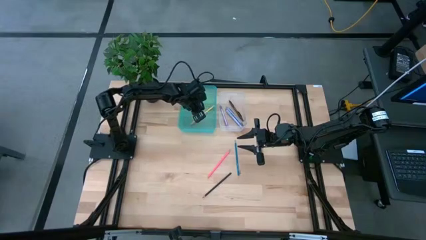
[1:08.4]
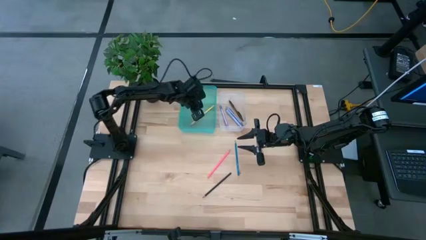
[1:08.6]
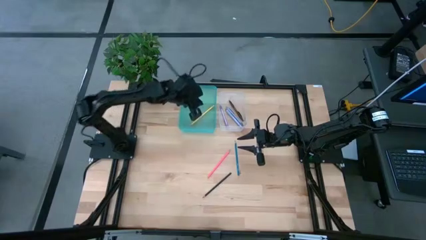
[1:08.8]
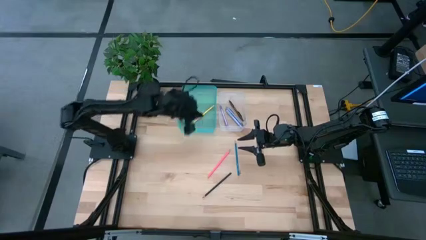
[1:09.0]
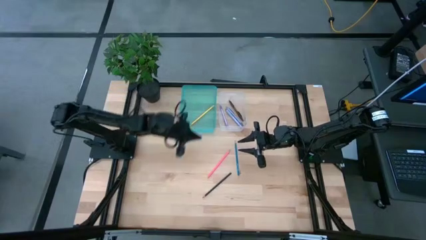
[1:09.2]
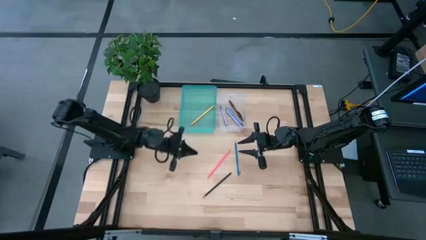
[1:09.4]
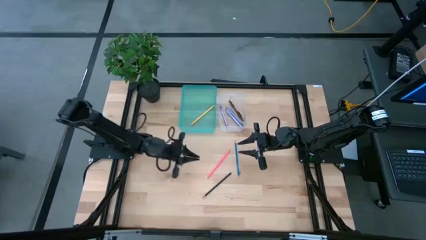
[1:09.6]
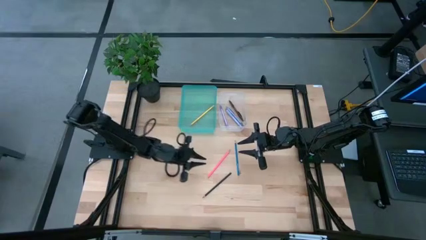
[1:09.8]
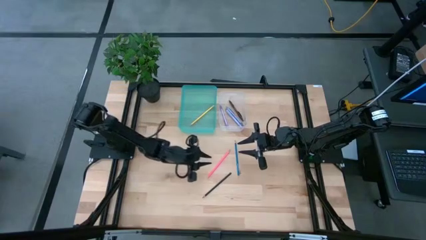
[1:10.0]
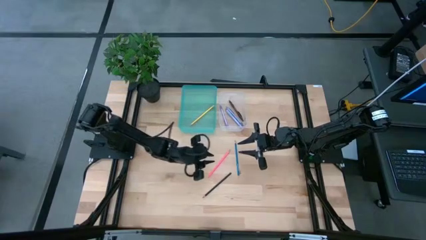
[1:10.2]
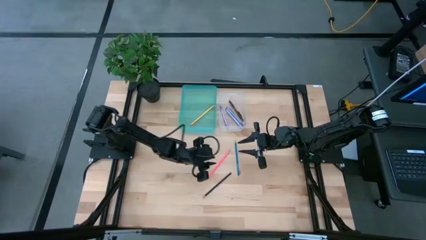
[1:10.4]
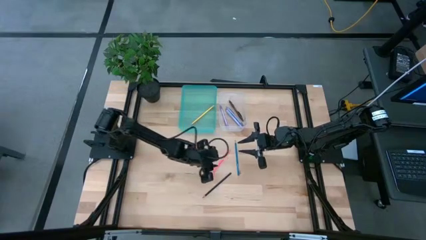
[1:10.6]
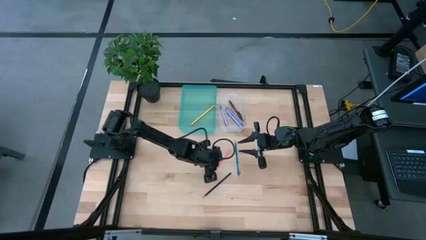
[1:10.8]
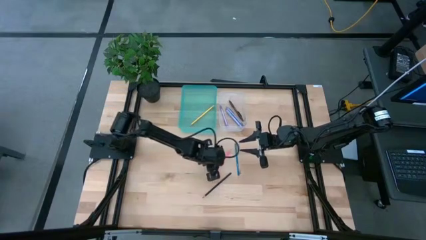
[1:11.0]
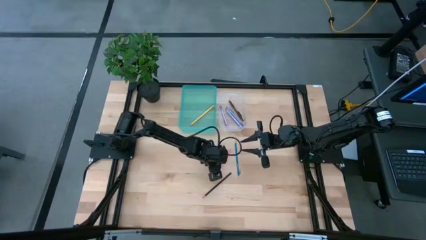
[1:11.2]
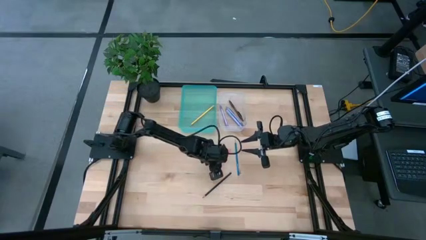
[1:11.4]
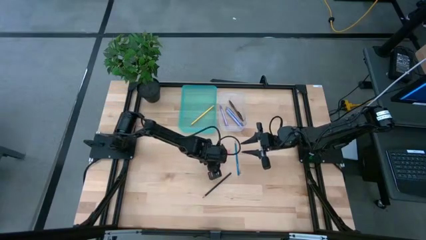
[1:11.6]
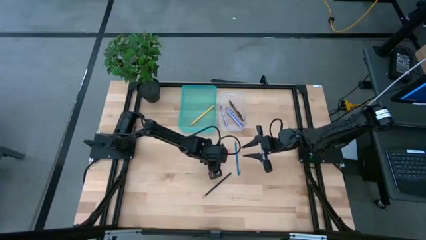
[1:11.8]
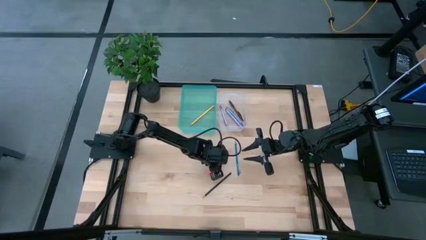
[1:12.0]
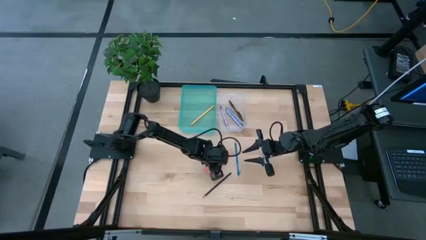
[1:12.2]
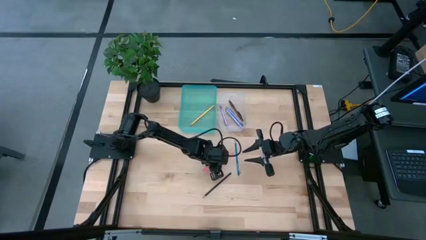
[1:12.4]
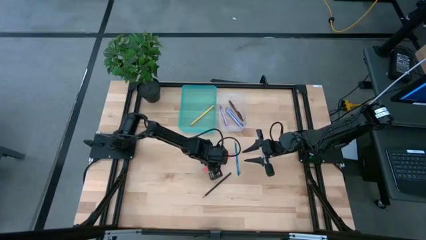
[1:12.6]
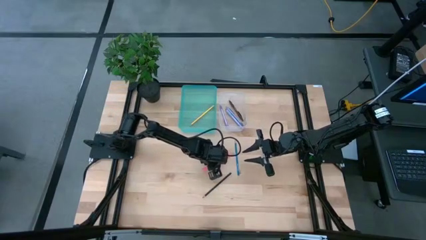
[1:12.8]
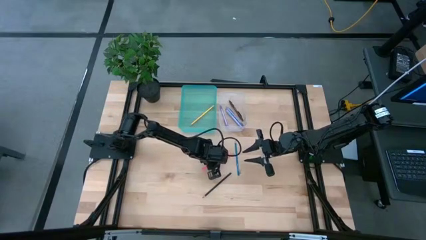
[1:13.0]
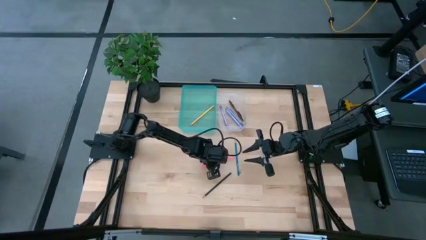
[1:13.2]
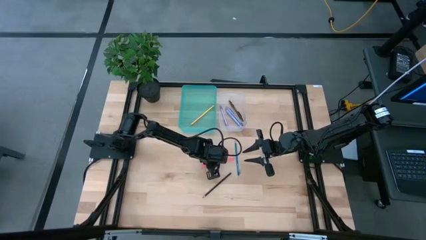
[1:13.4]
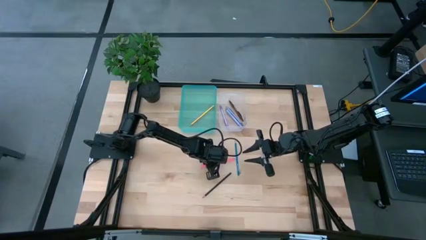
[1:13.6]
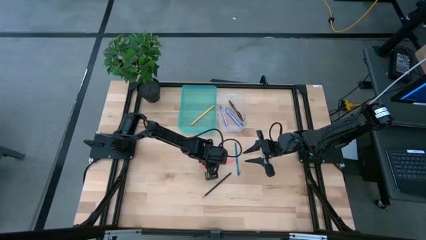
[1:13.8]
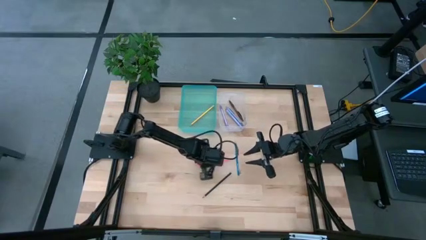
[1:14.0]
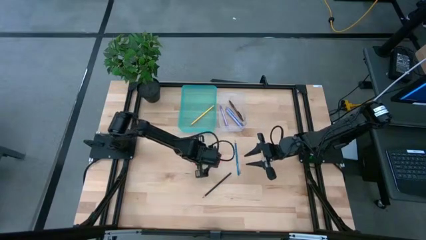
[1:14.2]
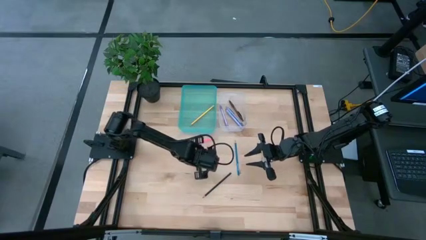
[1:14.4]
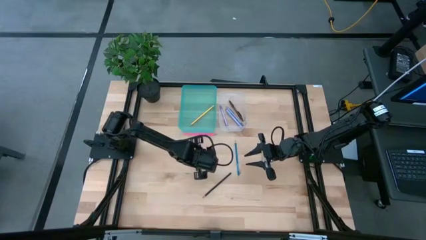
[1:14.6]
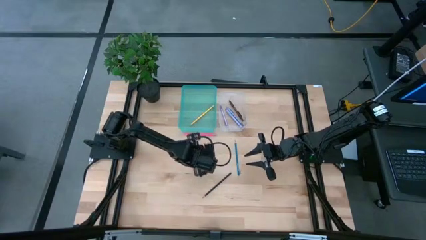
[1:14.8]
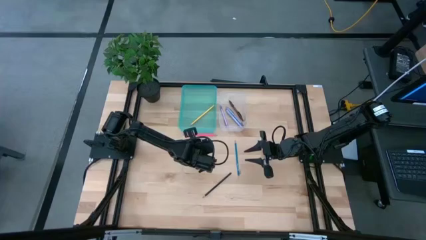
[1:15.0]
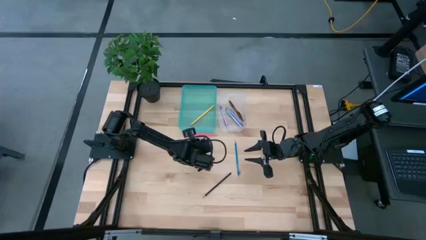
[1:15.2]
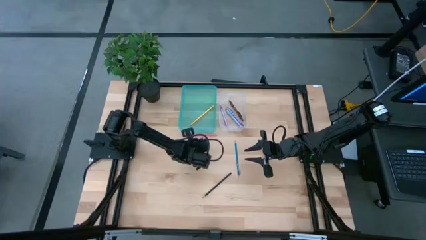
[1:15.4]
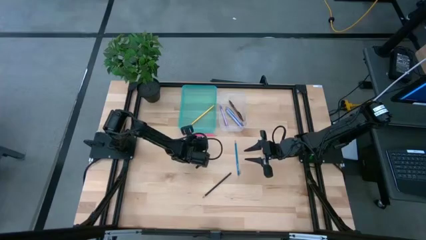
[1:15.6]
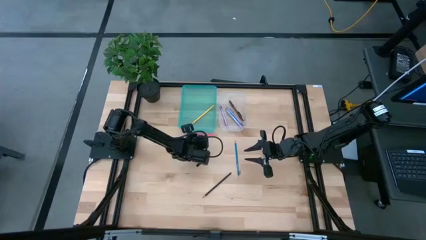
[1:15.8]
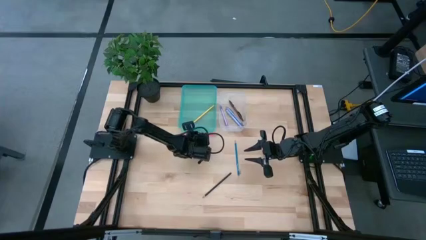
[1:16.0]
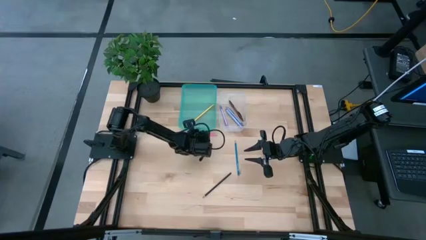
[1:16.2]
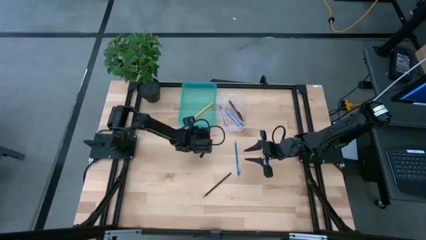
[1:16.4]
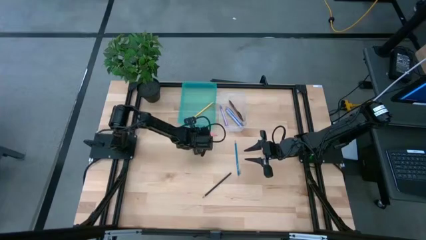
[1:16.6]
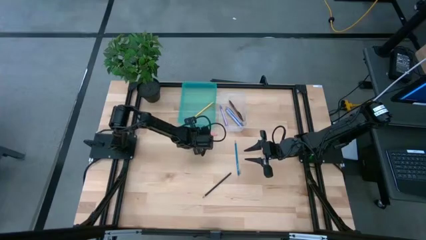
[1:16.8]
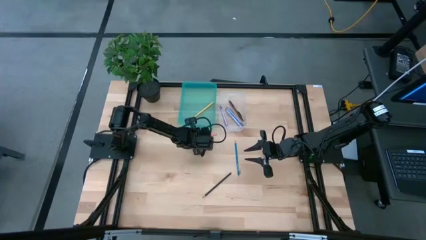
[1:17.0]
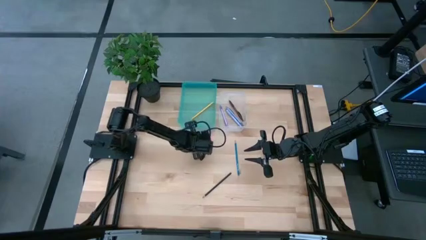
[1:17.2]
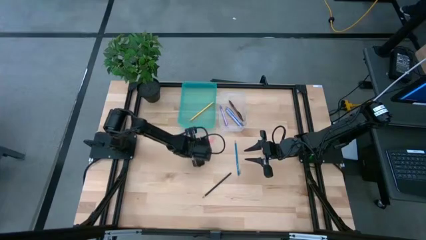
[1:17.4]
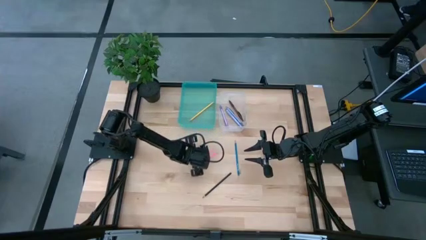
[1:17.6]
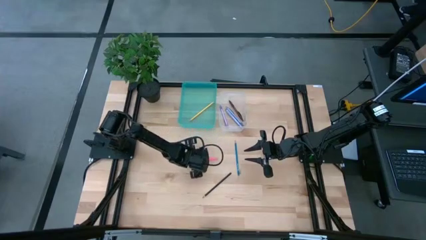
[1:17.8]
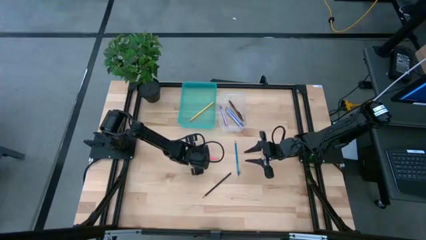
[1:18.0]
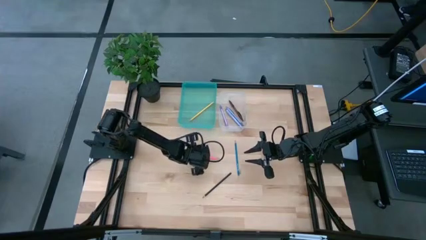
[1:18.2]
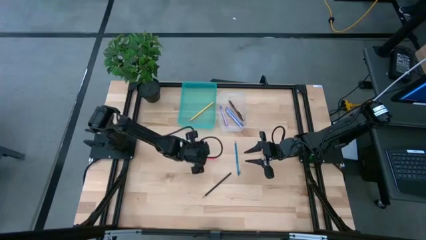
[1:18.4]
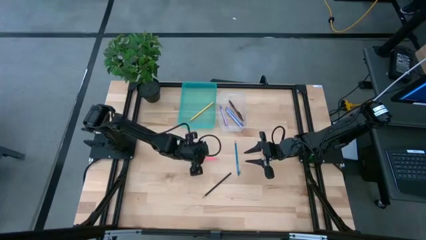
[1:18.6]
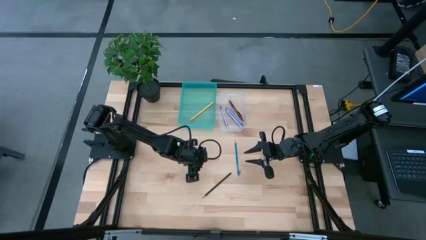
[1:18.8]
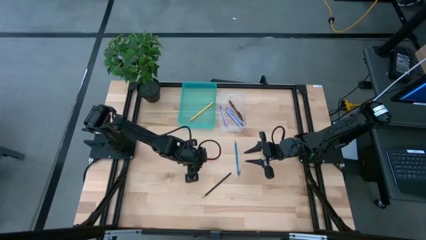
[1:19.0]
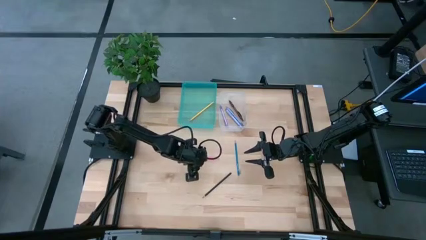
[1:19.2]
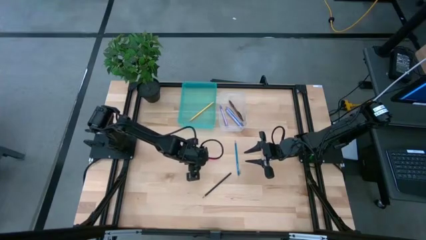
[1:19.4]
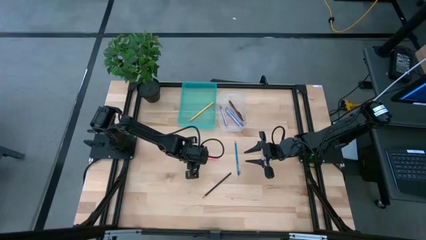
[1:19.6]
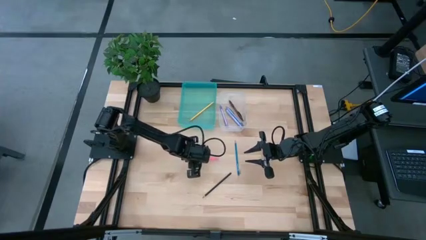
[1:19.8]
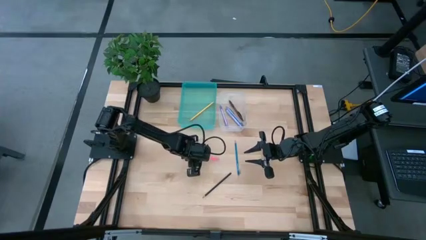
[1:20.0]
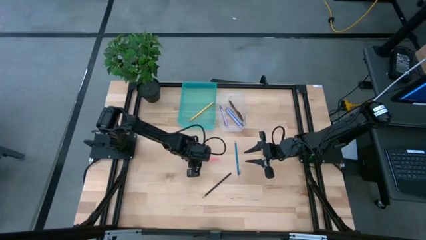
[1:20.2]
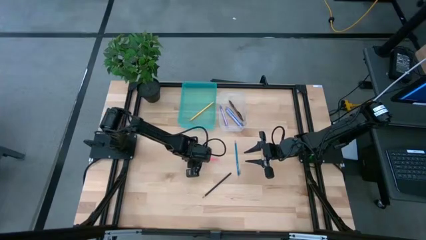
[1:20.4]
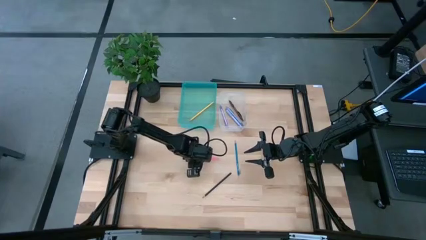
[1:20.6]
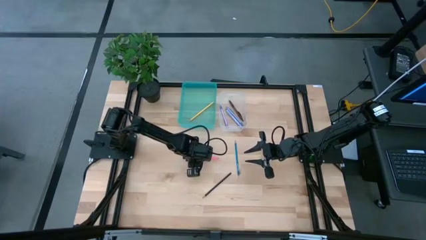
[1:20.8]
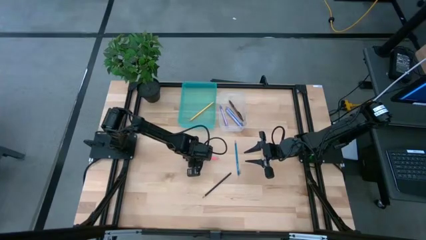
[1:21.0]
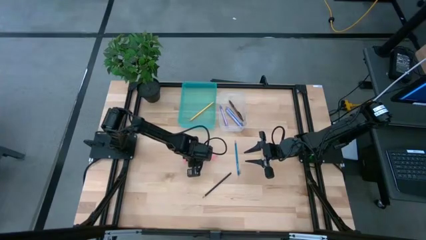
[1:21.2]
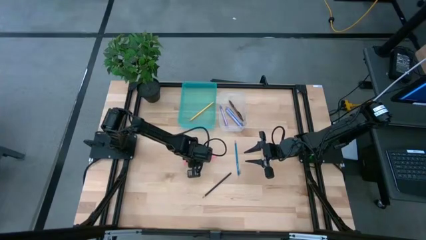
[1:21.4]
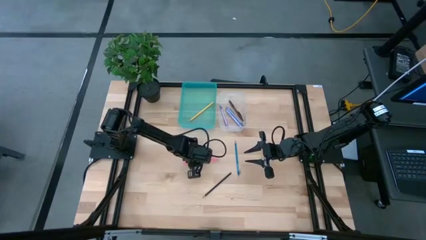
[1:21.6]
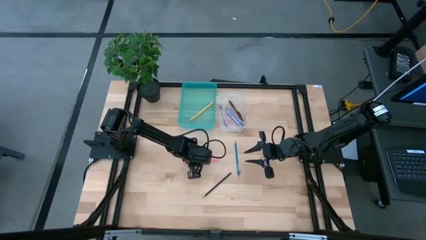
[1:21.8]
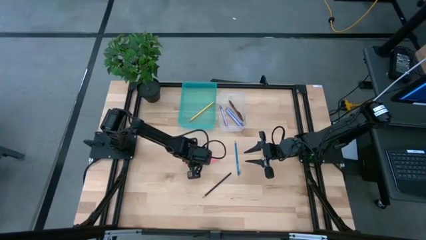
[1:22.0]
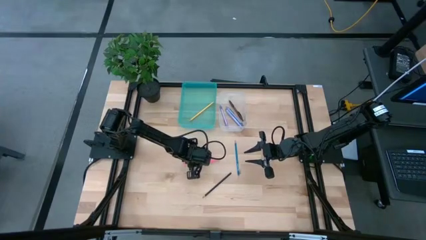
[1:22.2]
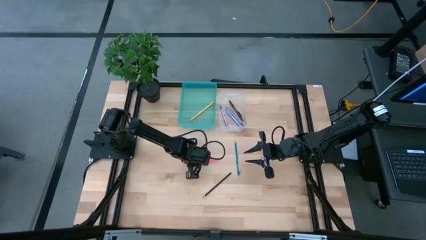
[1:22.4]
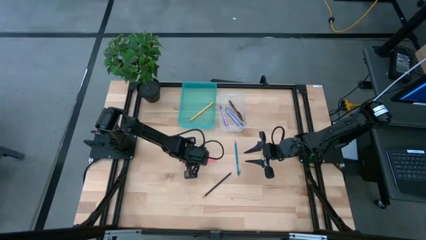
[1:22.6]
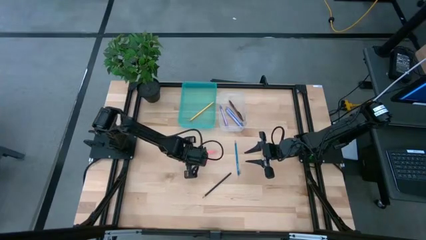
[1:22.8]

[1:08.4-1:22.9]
Task: Sort pens & pencils
Put the pink pencil into the blue bin

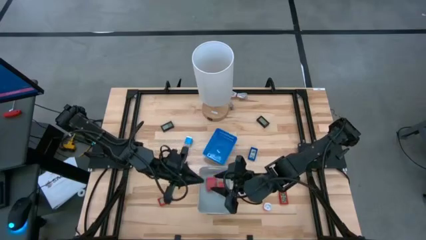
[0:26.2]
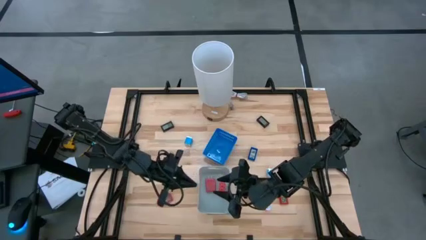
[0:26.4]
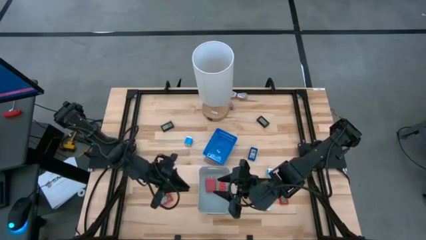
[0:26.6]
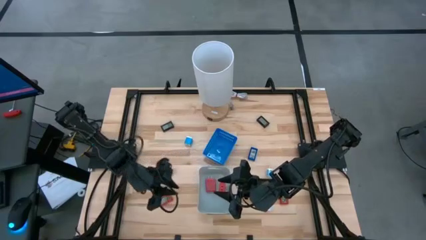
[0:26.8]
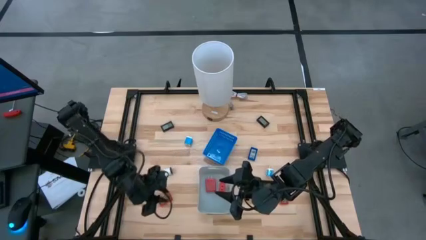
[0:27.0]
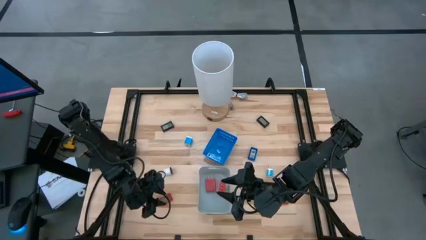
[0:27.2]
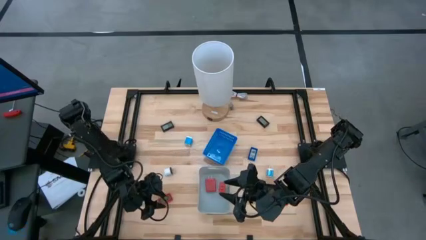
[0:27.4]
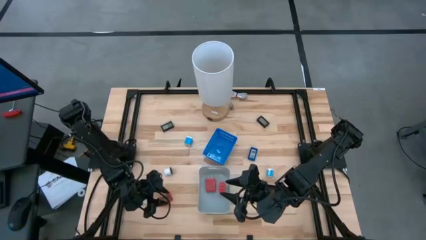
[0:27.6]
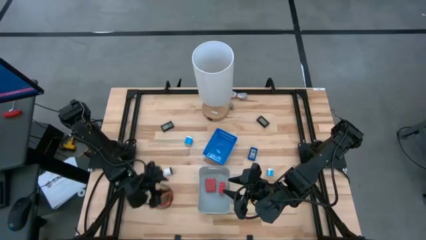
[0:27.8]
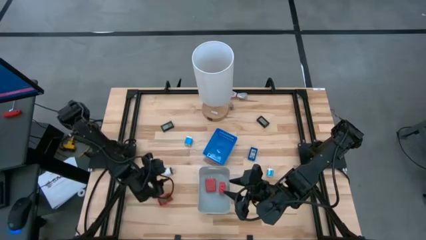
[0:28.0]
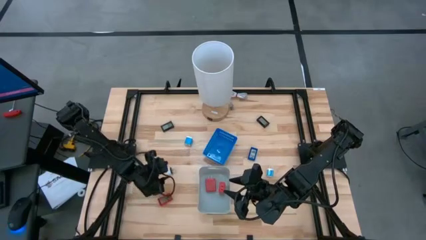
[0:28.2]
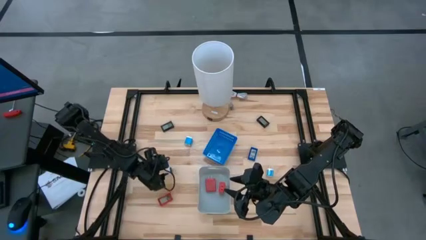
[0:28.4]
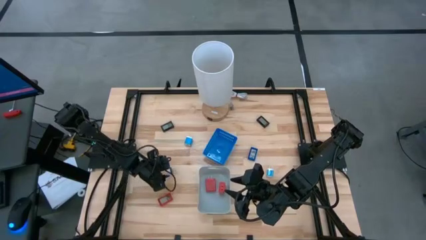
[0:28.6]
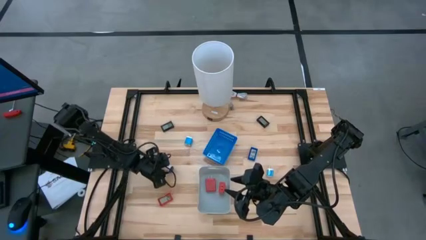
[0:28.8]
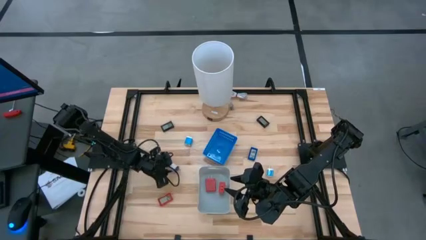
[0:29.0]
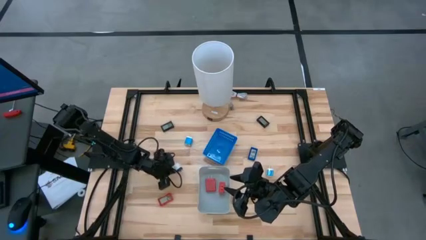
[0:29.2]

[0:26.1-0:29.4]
Task: Pick & Place Office items
Put the white charger adapter into the gray bin
